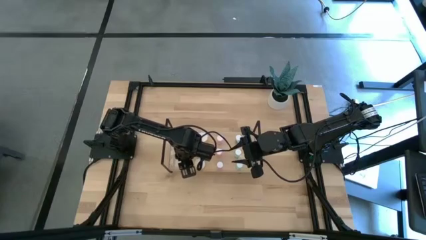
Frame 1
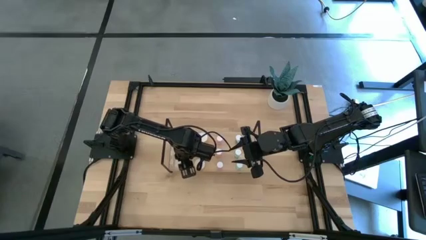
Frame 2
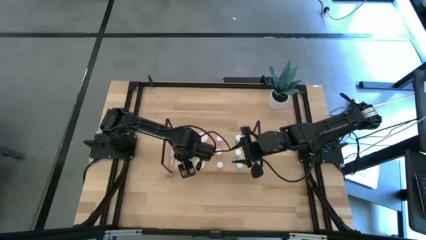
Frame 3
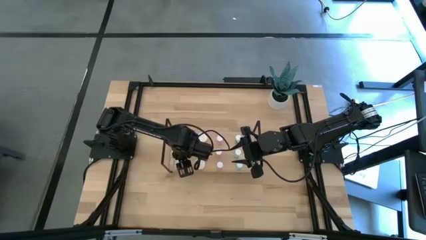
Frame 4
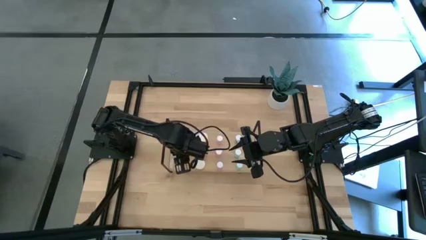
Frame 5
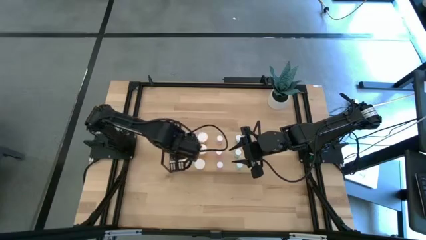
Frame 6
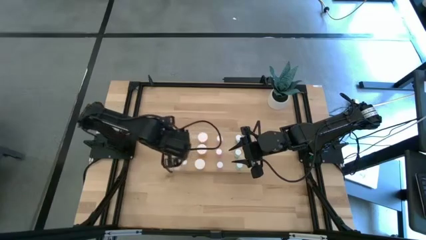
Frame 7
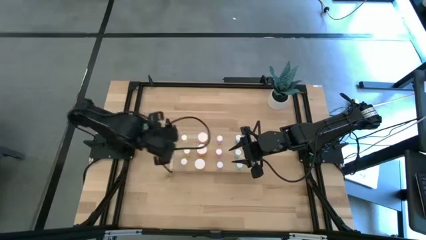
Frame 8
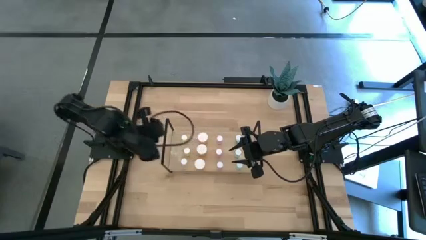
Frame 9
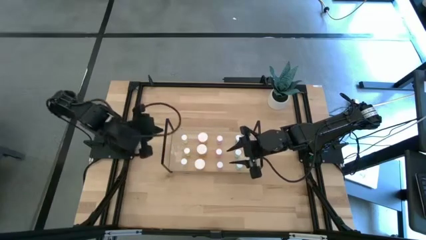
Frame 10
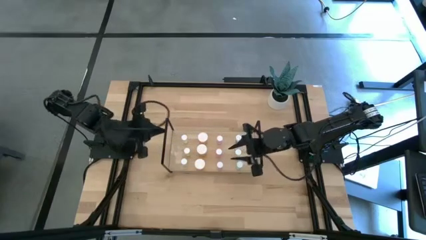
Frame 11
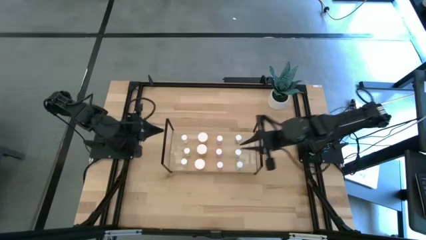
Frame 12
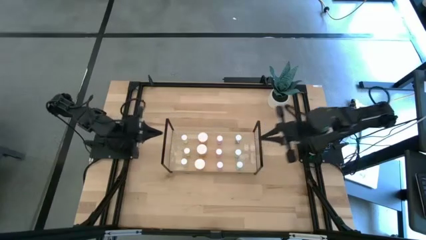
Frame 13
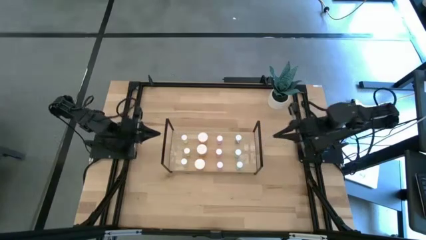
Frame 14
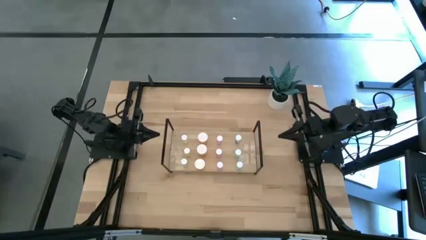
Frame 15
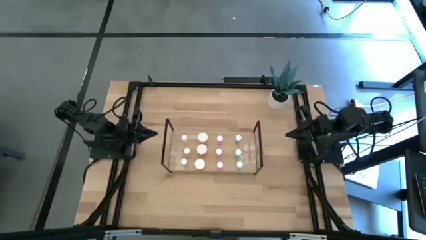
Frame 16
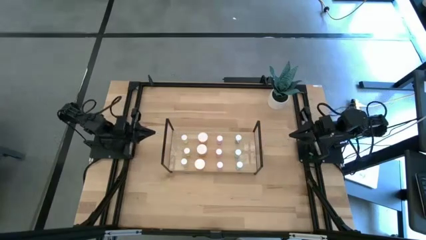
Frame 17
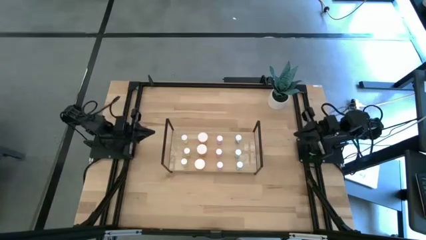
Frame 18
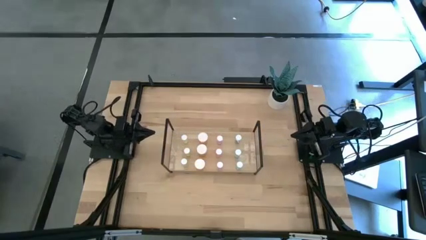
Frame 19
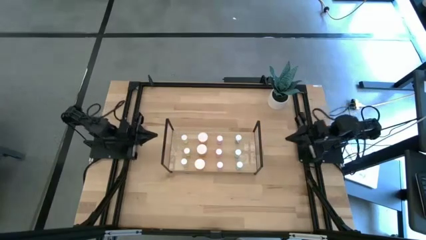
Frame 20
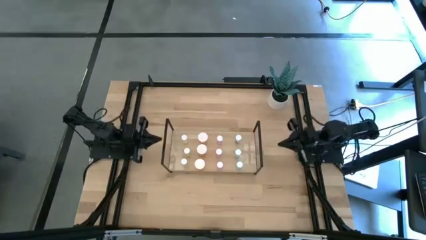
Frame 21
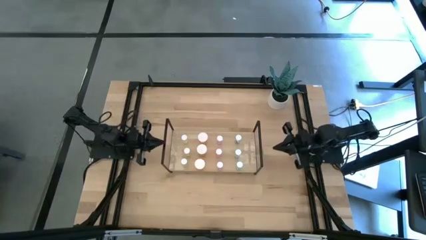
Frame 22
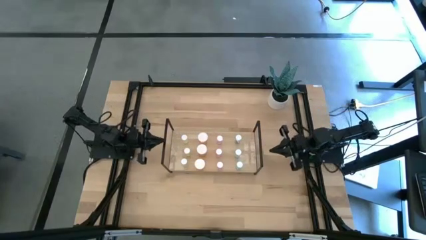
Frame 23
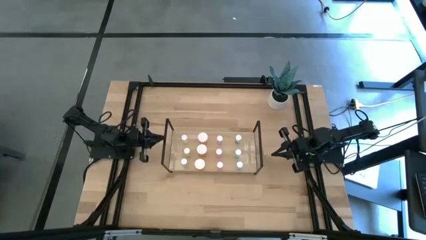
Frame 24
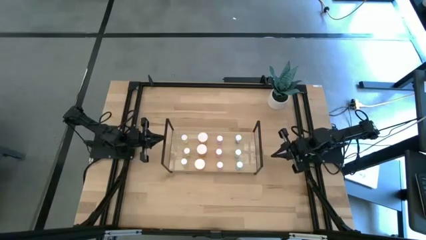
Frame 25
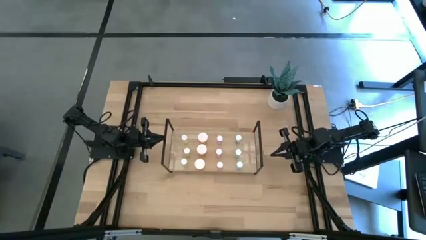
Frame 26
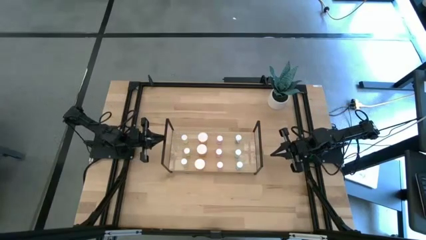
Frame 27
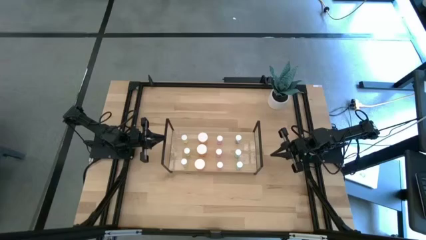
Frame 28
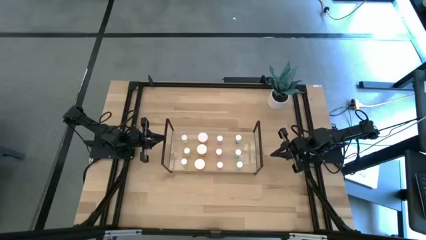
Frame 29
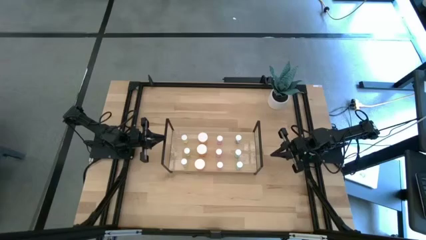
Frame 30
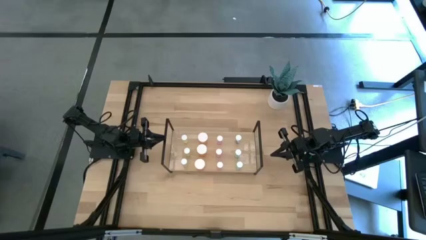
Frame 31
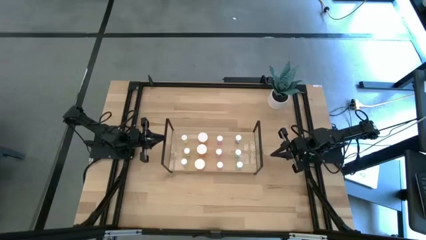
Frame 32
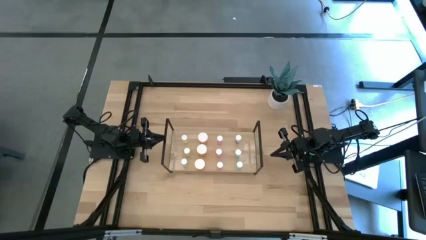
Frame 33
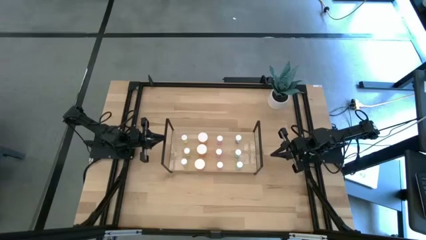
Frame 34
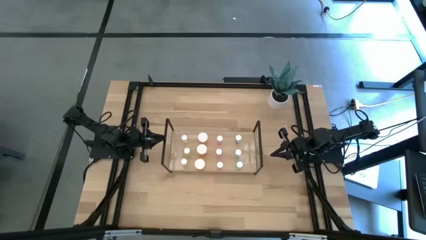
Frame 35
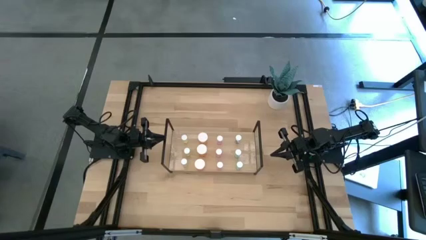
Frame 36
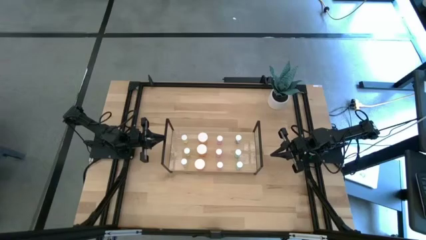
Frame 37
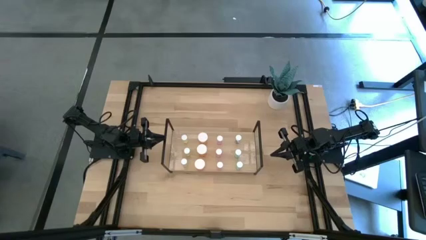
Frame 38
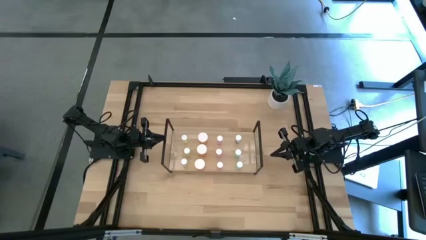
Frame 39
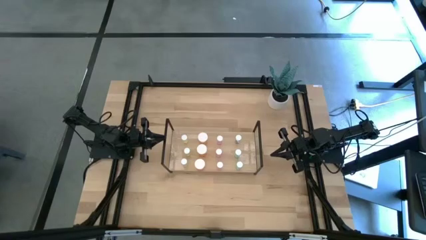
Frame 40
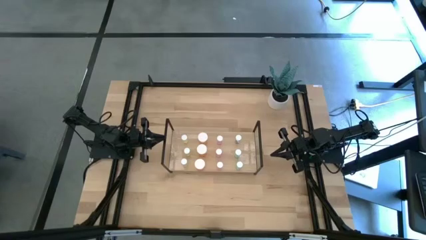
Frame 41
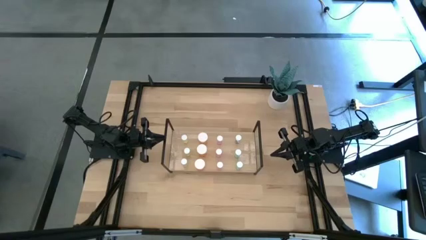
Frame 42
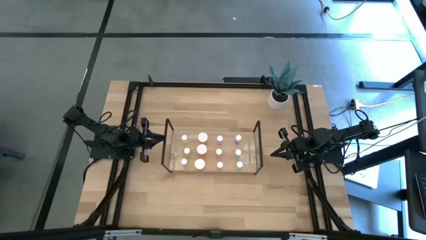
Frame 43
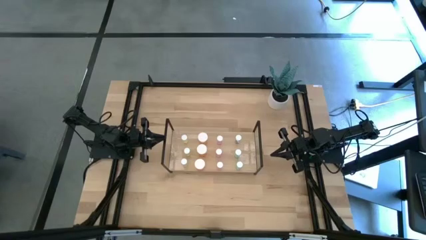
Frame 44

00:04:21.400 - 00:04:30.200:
Task: Pick and place medicine bottles onto shelf by color
Return to Home Position

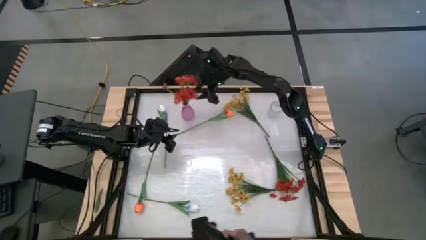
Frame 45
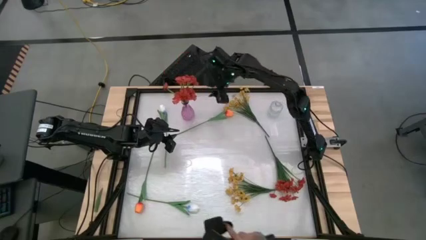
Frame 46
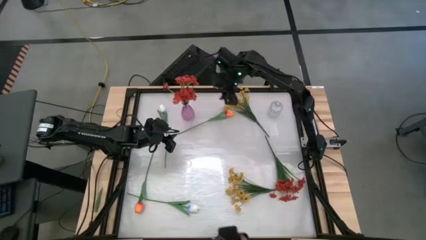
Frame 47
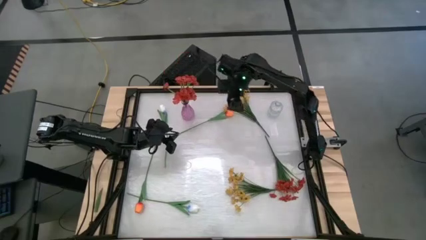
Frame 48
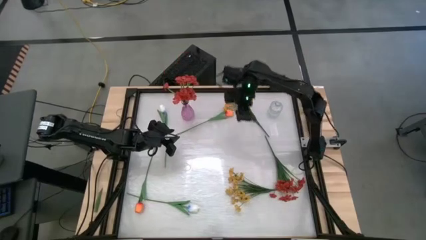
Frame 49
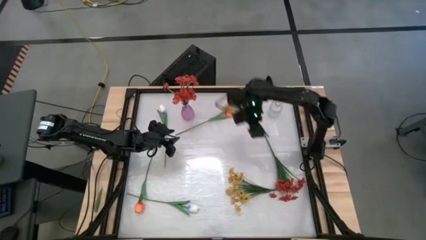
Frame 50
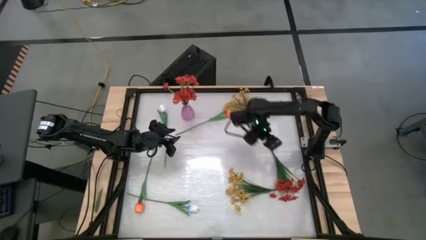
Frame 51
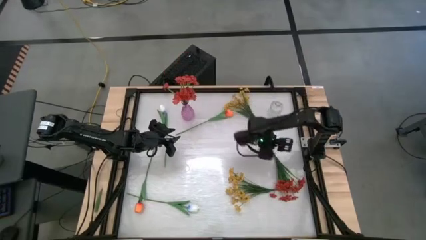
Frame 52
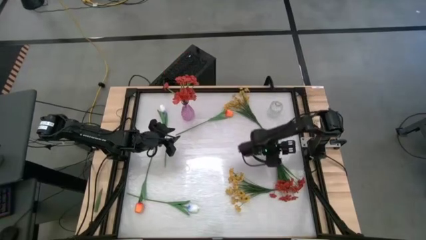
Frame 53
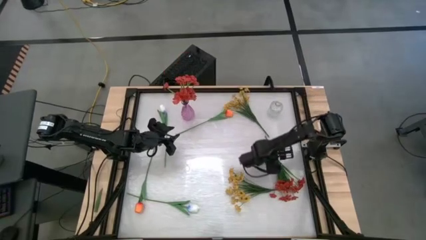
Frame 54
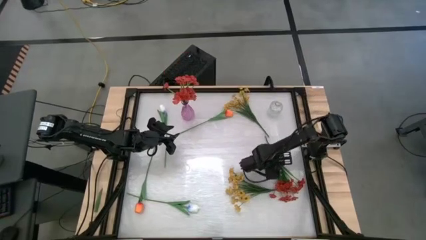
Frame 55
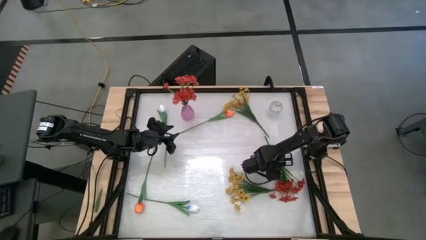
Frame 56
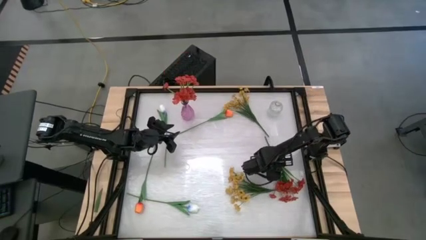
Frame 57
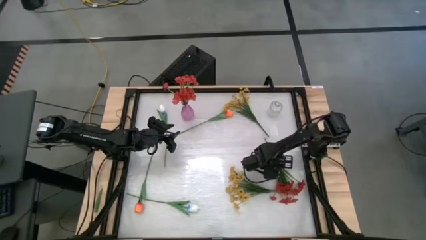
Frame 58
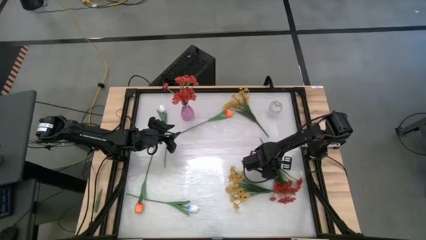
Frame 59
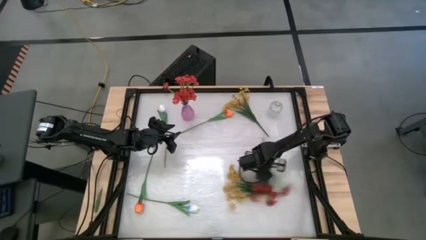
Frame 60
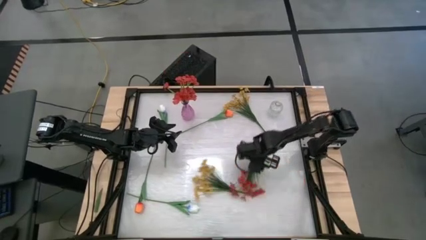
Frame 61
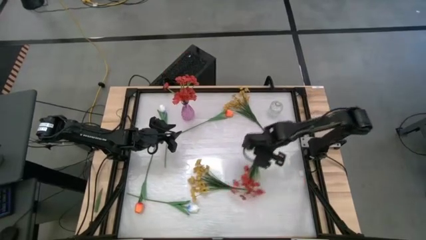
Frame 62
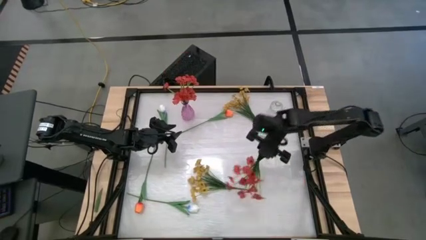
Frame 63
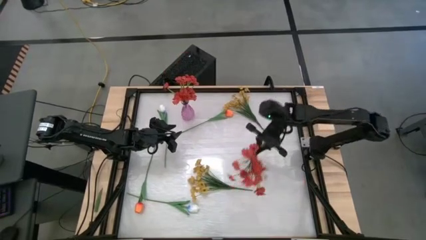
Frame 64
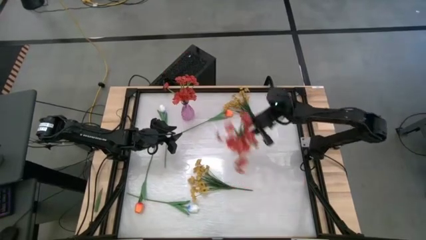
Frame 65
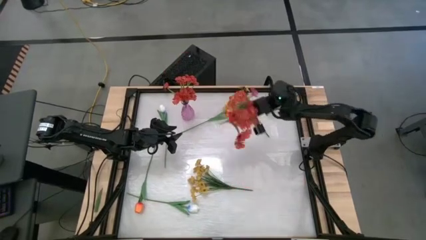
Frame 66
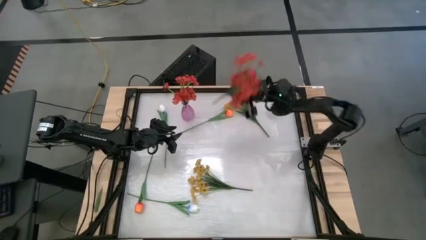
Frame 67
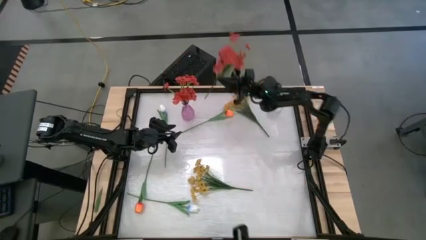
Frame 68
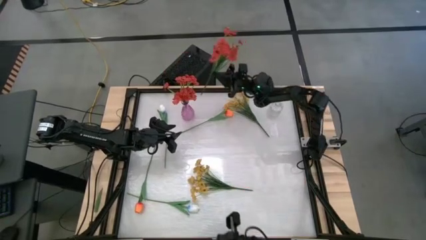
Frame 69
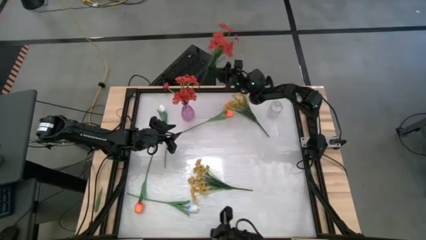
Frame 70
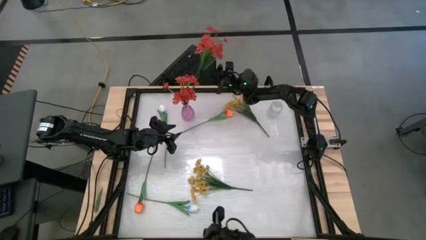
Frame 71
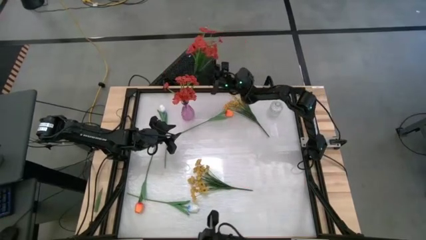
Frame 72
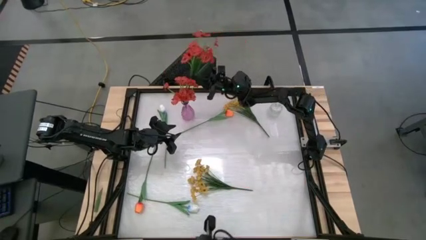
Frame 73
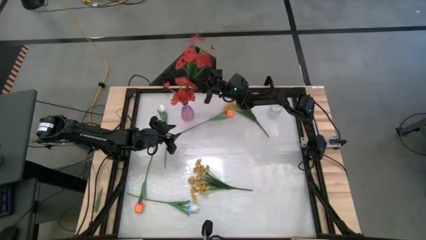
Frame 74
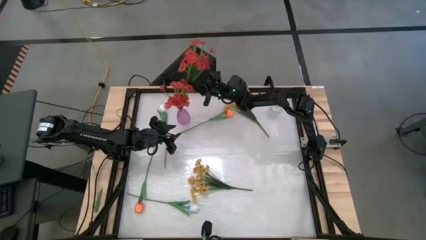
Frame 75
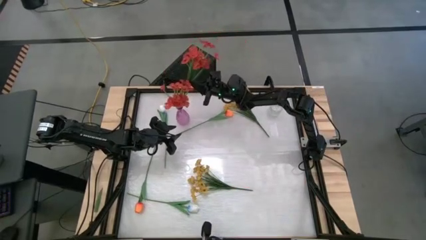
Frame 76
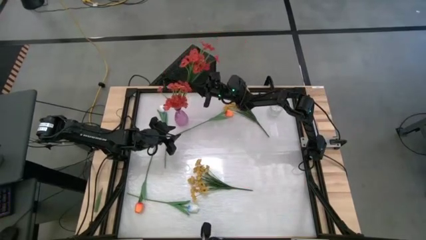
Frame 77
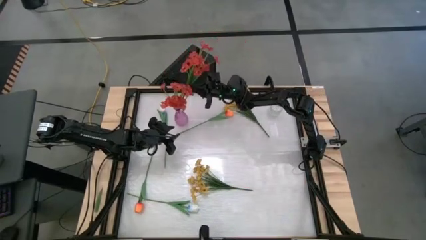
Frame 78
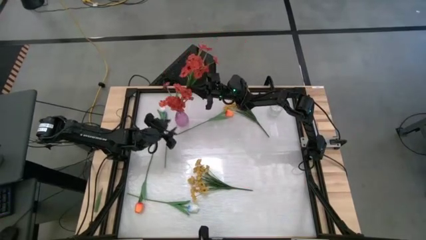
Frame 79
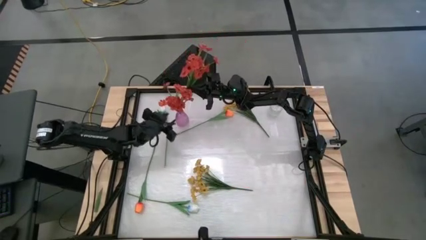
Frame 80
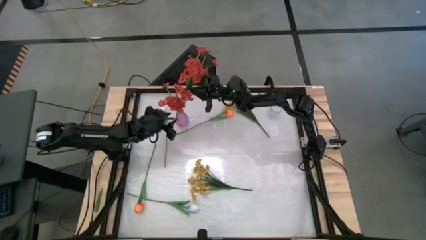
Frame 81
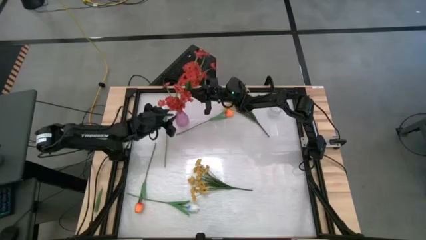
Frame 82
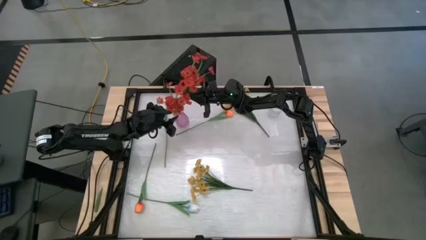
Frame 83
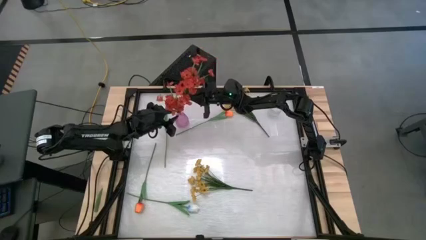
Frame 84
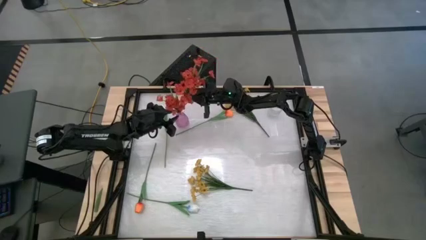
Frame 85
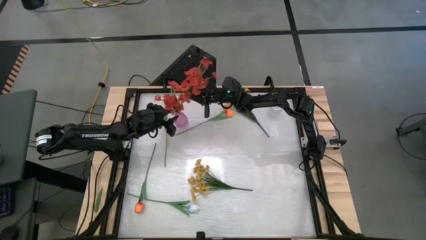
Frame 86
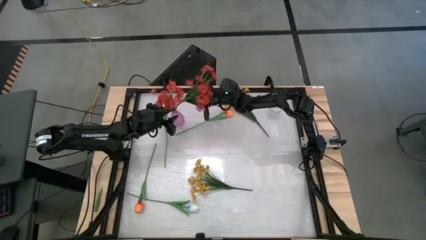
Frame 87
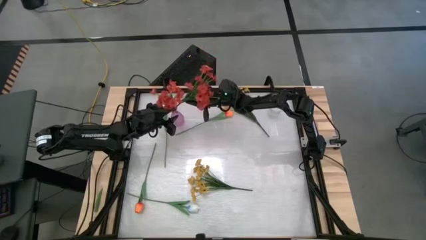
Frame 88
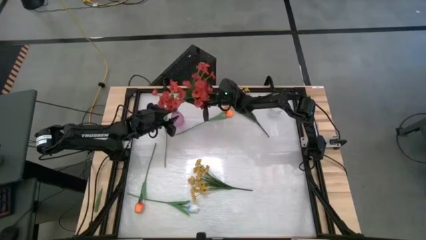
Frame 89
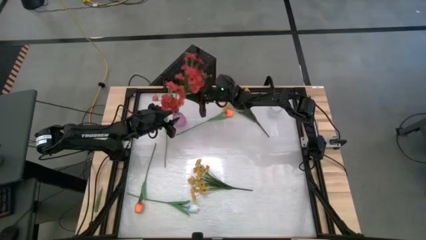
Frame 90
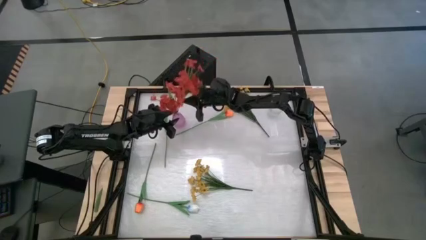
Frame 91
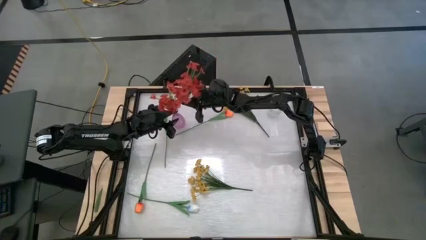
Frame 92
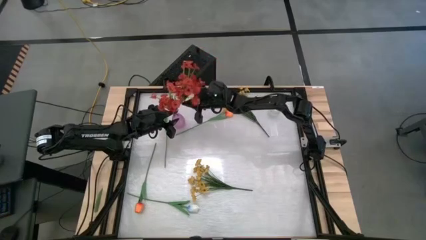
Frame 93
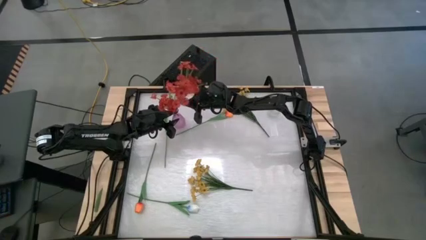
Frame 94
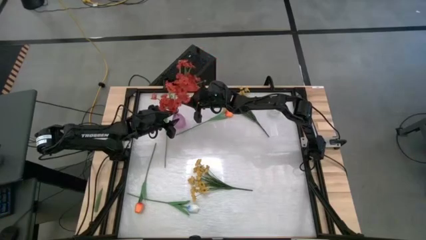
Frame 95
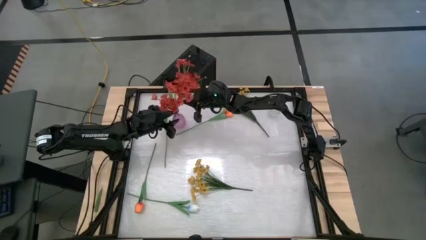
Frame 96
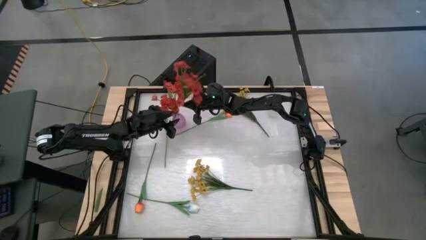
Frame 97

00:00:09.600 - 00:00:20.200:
Task: Sort flowers into vase by color
Put the red flowers into the pink vase
